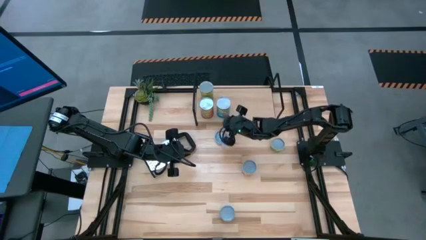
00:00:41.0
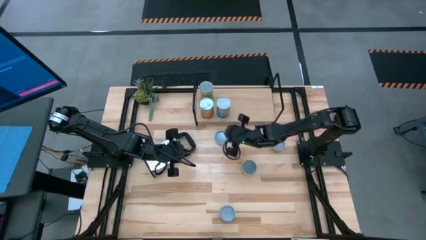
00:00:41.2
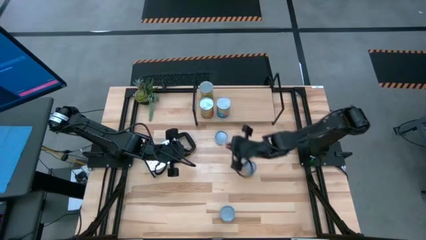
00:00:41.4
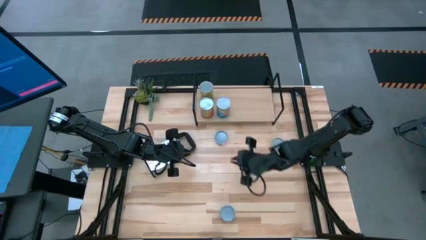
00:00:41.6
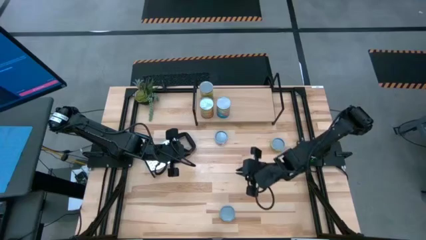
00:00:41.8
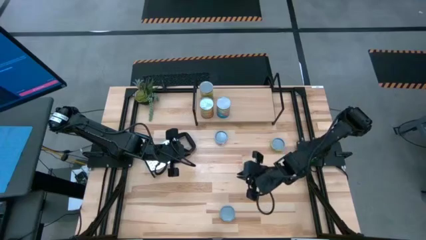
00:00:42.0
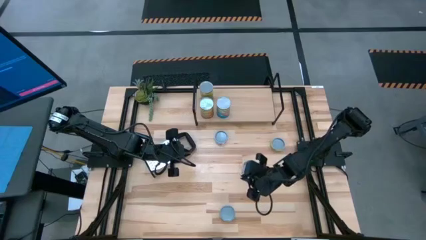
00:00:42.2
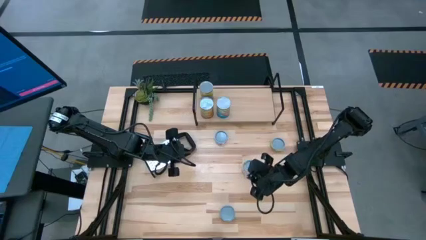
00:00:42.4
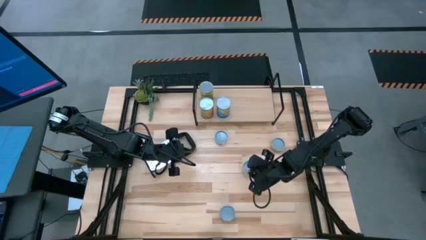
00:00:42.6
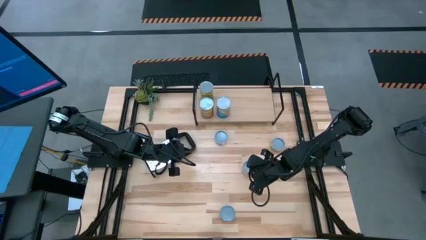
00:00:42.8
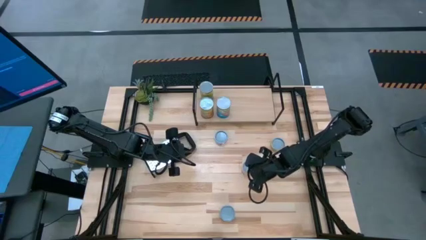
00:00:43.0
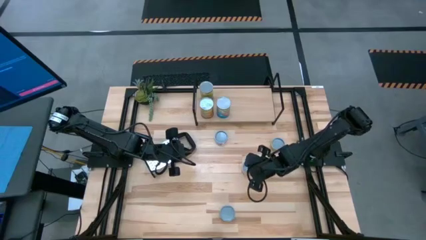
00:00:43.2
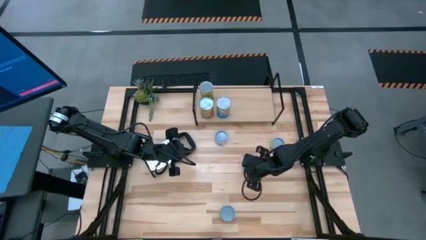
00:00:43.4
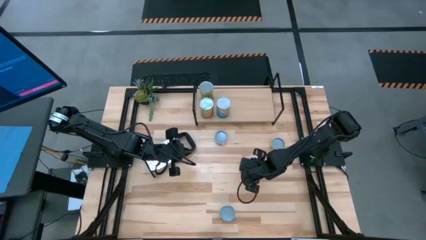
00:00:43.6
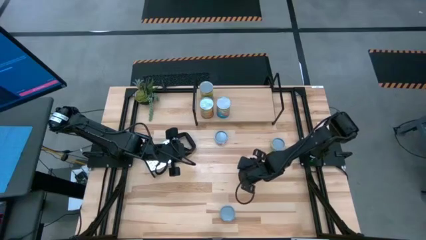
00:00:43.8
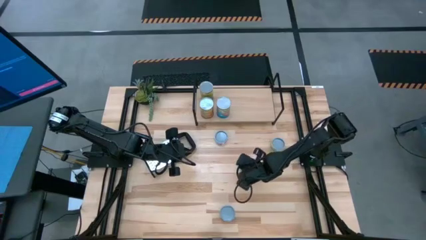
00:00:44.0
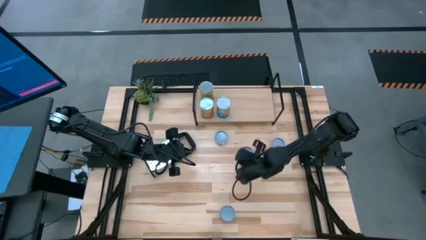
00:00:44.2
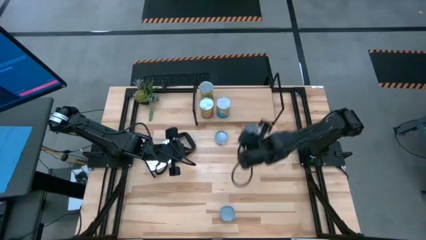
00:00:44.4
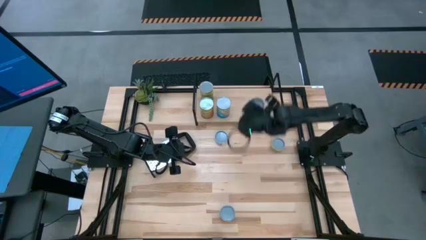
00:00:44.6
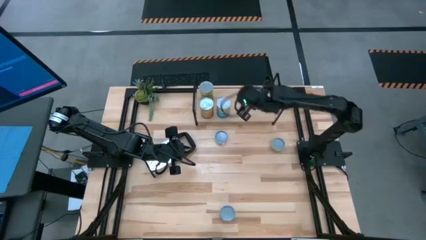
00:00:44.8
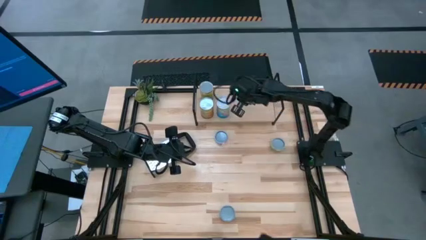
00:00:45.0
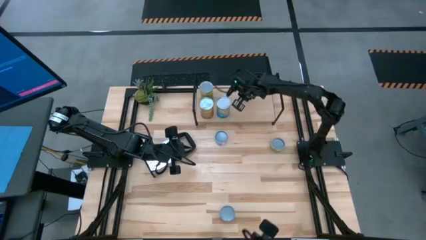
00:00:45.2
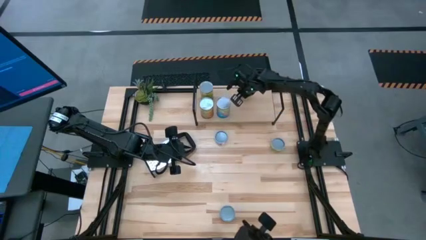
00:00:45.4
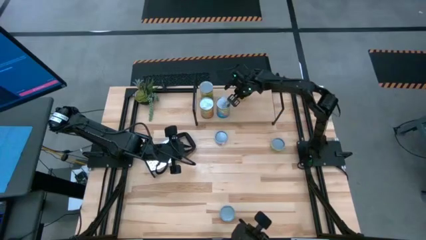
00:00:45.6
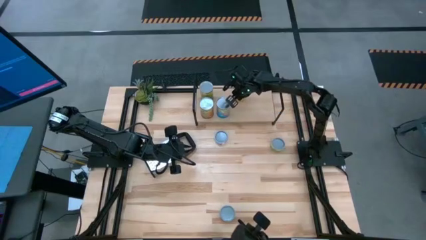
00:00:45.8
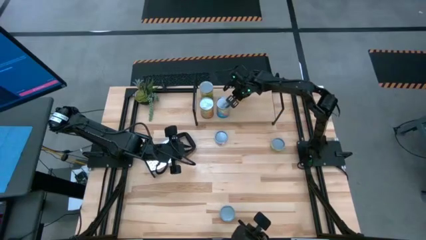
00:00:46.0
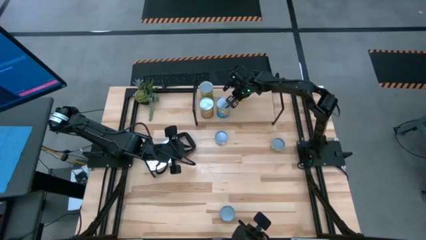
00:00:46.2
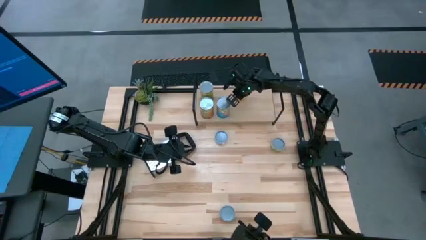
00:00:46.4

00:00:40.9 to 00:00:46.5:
Task: Pick and place cans onto a shelf
Put the canned black beans on the shelf

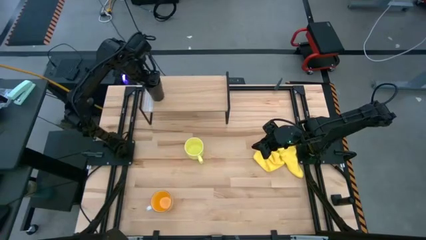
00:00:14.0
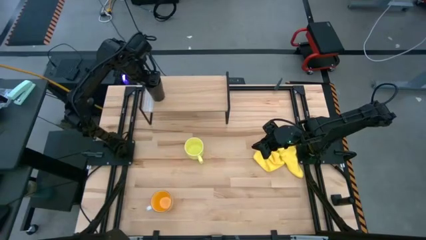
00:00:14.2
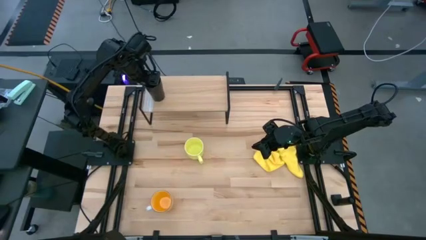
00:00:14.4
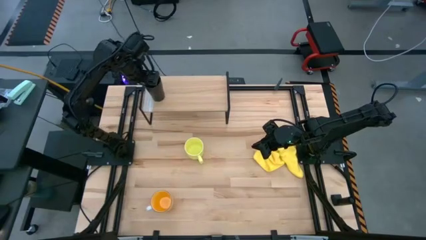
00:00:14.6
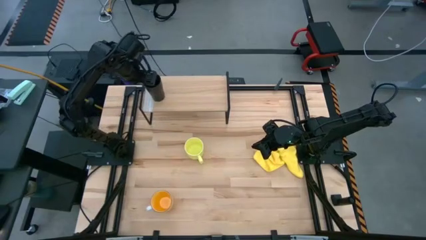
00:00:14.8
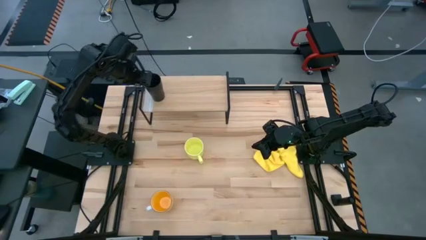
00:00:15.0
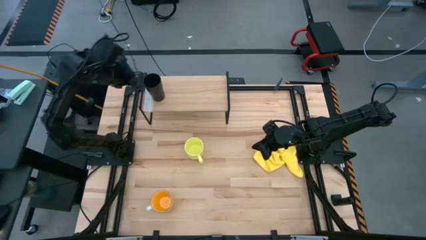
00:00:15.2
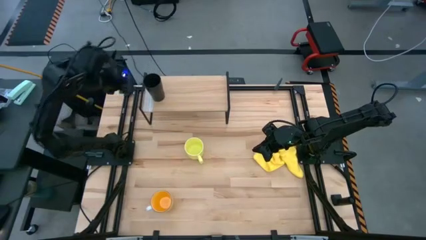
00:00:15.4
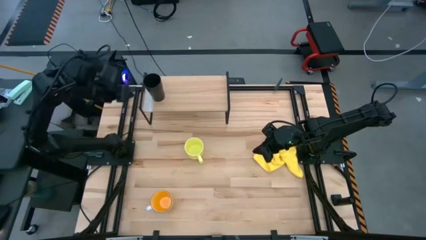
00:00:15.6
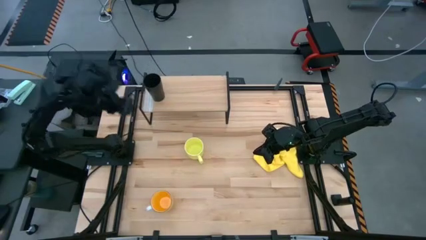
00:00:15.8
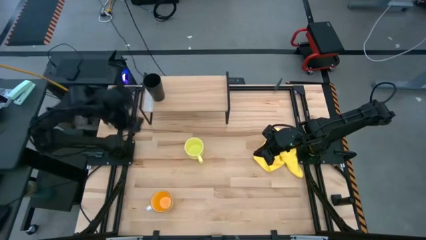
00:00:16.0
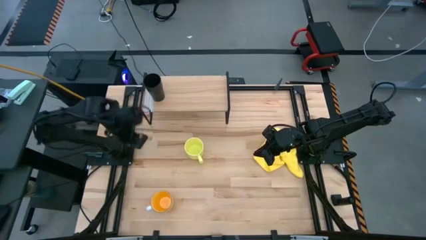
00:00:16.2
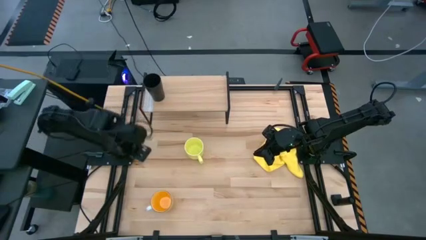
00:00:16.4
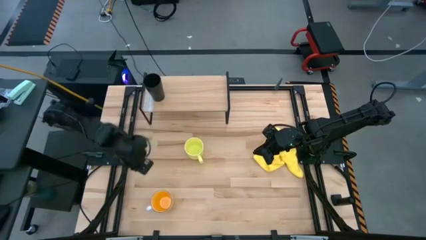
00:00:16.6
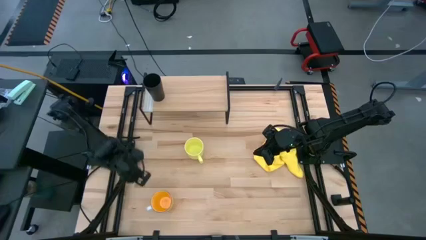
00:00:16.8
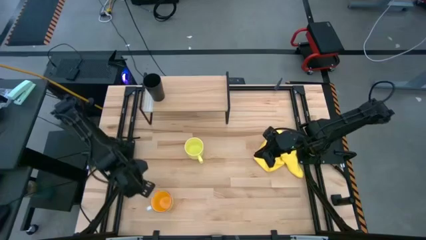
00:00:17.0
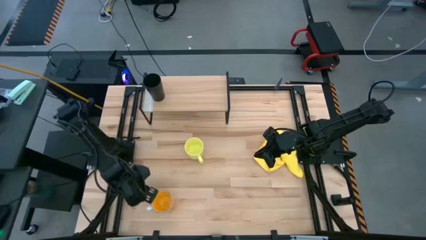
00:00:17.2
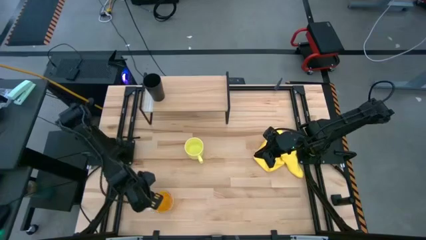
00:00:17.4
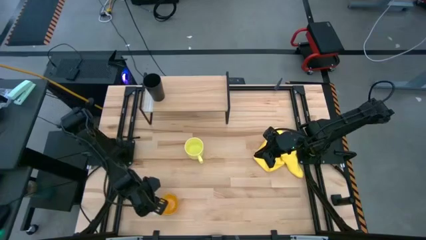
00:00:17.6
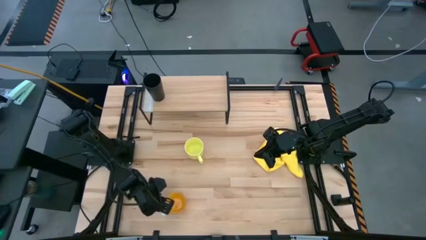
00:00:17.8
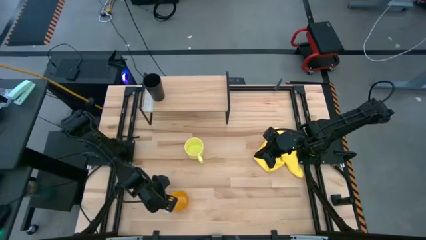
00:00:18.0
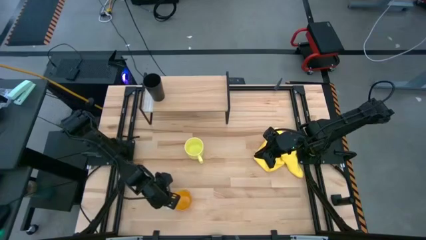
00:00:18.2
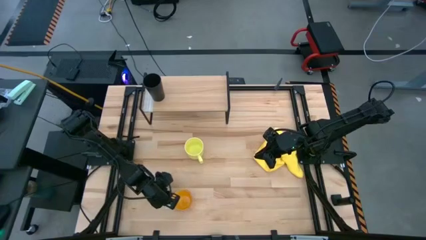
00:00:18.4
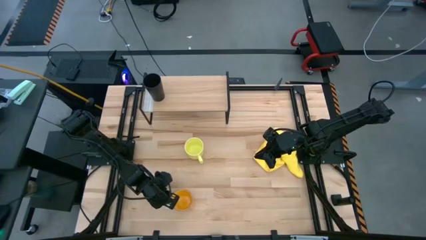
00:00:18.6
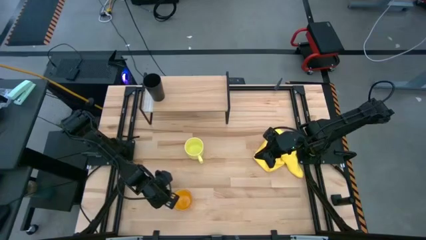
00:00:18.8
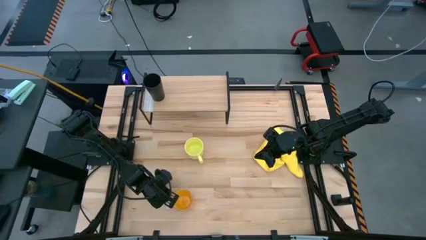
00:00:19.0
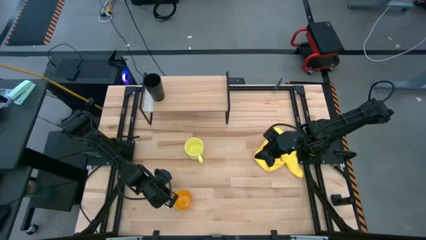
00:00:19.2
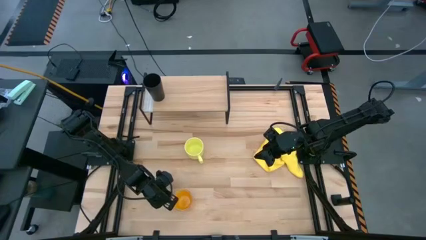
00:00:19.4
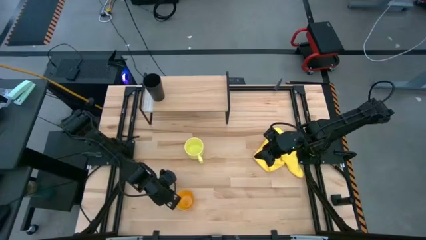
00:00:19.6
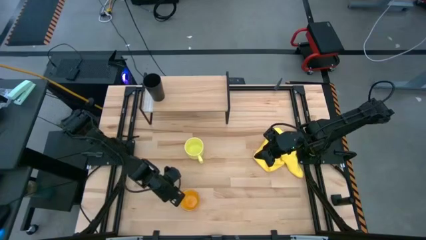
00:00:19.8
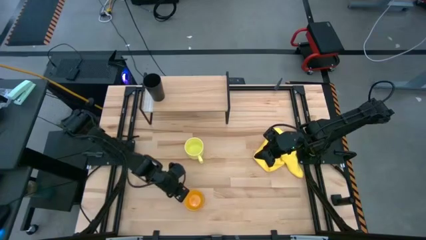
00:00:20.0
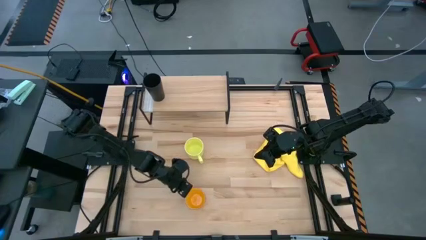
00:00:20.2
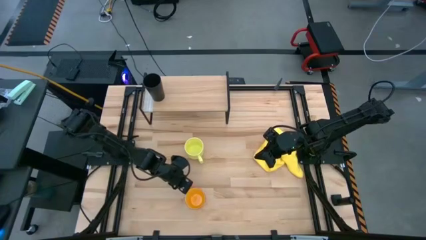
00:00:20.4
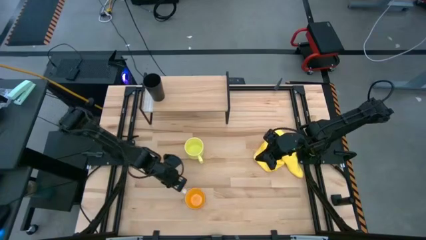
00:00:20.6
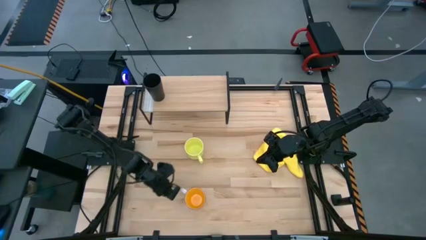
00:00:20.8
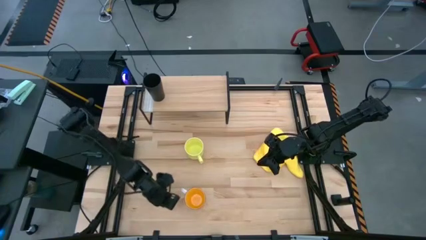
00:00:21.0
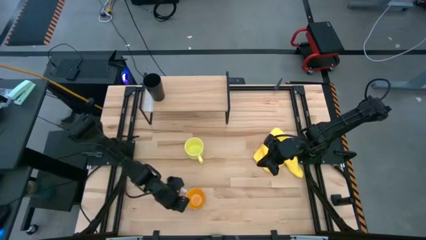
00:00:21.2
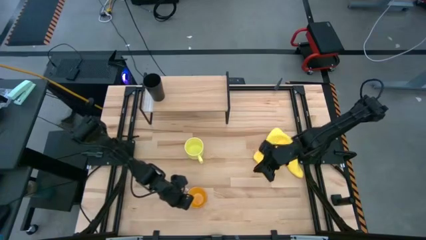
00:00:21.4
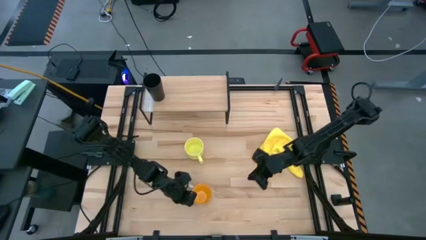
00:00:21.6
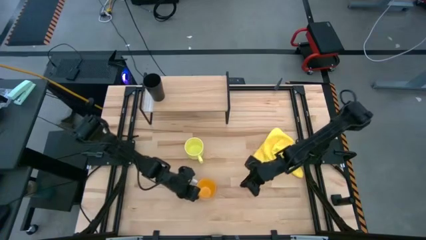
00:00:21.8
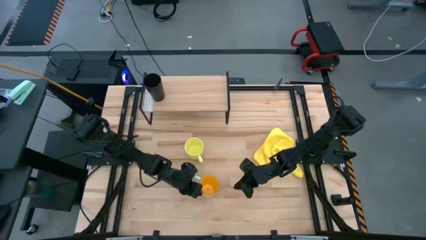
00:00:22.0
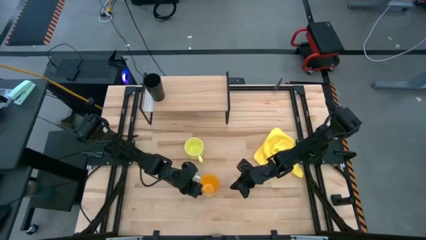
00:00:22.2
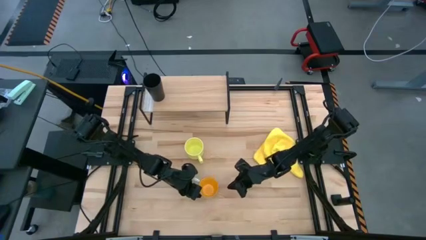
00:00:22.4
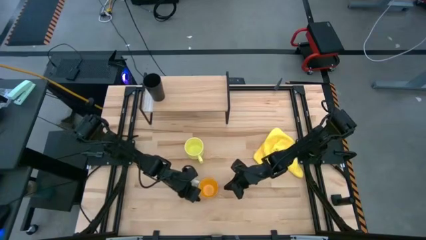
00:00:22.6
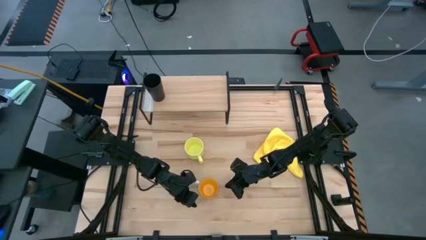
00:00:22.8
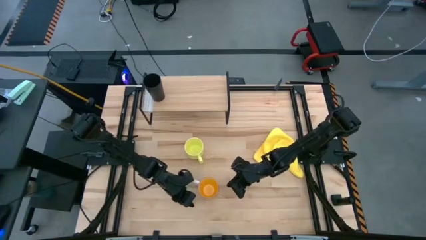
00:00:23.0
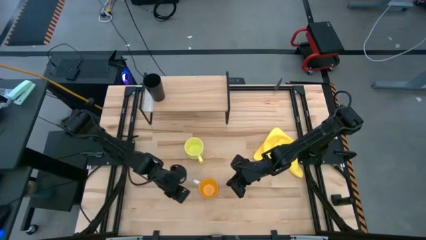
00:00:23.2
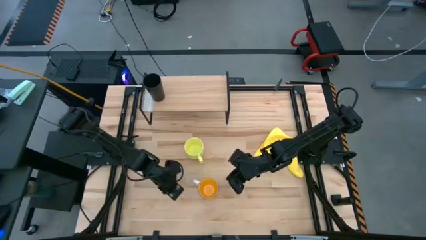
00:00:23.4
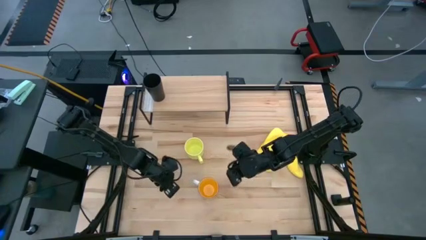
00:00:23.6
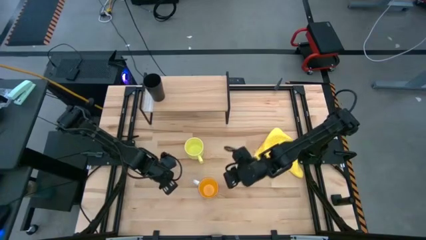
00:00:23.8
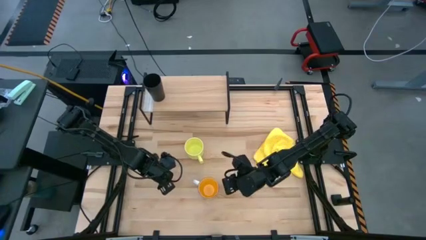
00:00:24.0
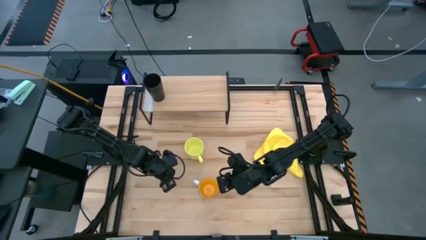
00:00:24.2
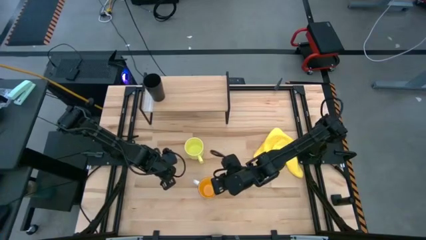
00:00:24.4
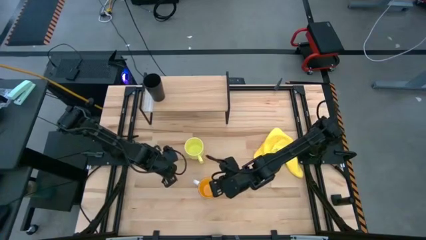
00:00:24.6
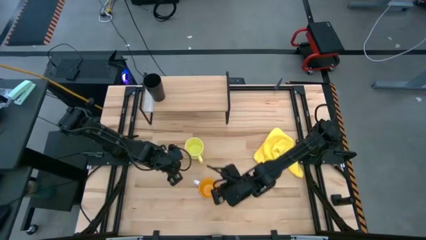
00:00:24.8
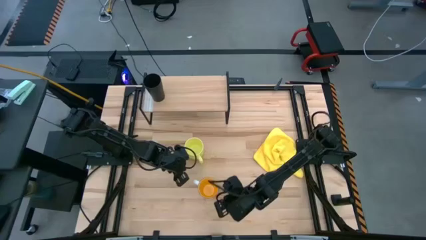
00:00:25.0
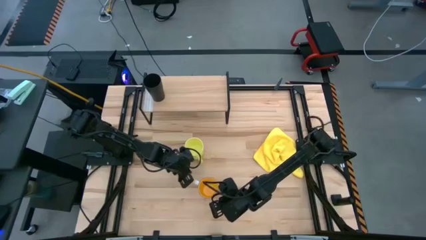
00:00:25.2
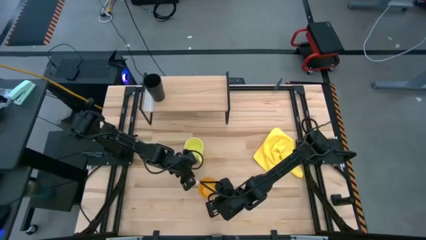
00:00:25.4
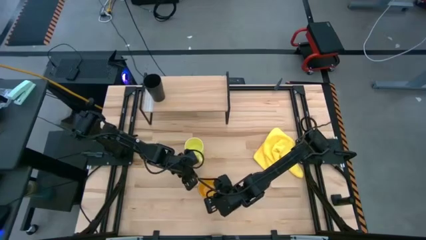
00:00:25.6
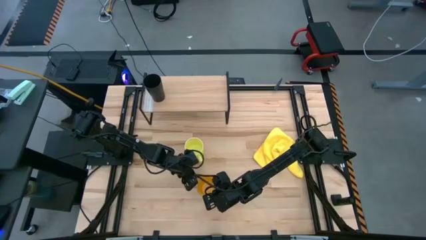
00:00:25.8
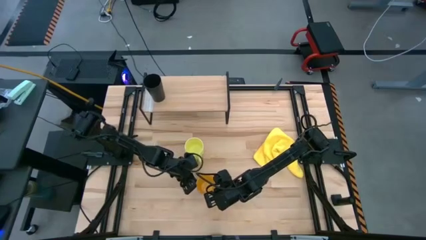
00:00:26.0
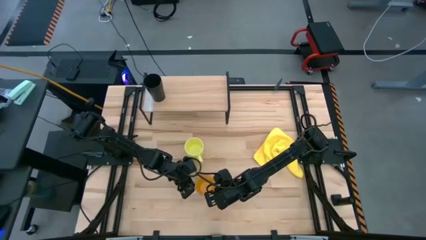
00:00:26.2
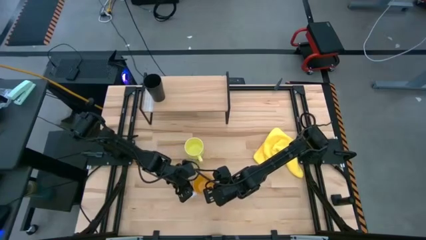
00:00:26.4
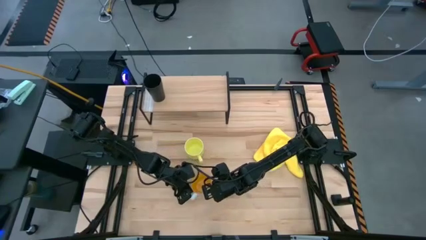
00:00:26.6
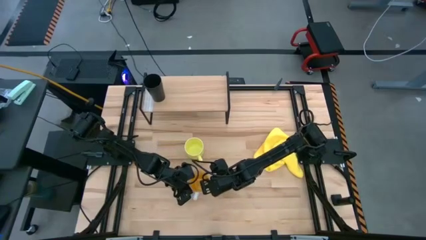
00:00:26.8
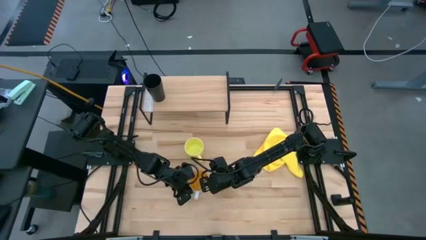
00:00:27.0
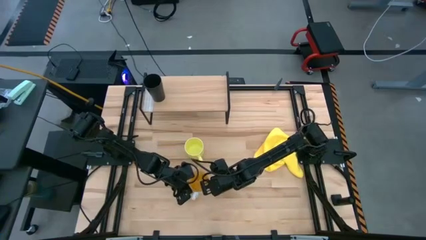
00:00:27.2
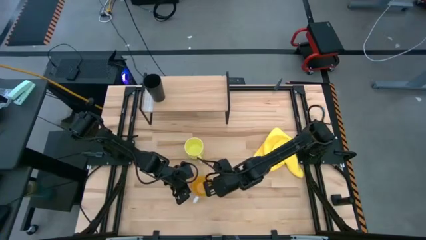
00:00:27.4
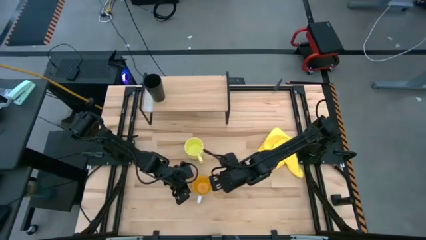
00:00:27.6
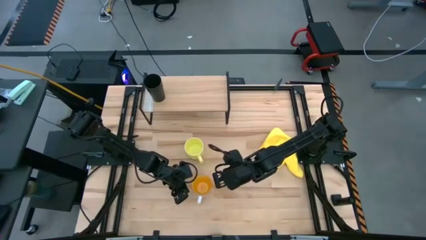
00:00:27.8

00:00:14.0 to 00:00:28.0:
Task: Stack small to large cups/mugs on shelf
Put the orange mug on the shelf
